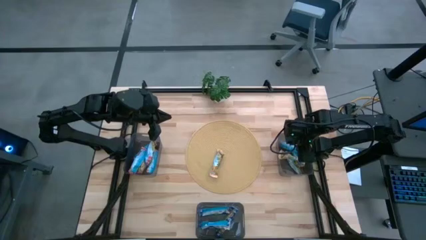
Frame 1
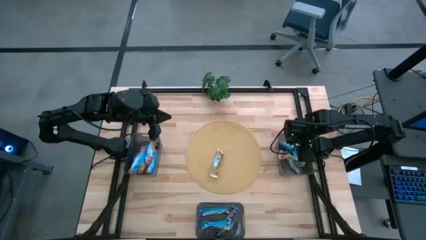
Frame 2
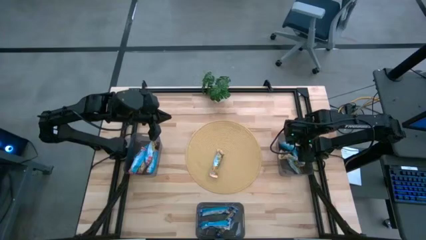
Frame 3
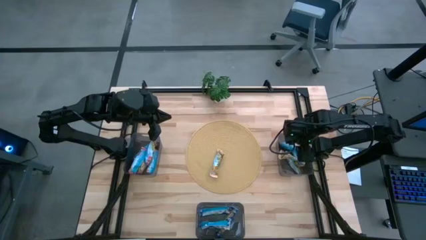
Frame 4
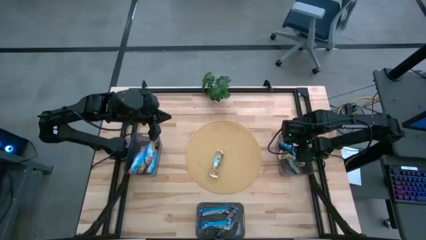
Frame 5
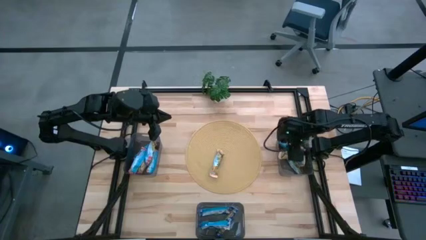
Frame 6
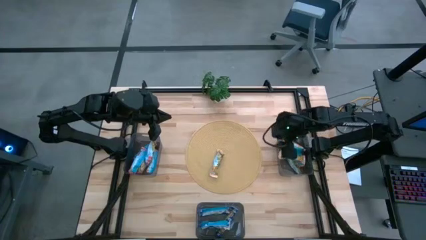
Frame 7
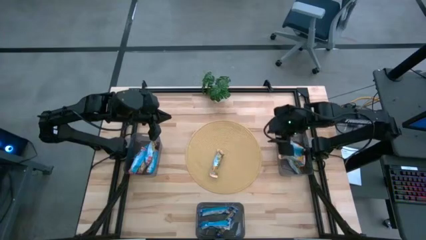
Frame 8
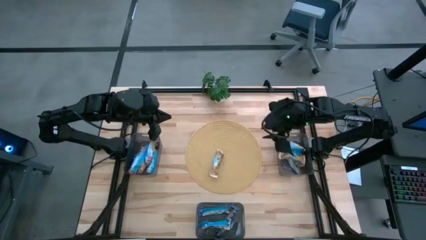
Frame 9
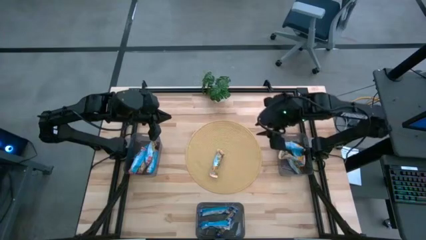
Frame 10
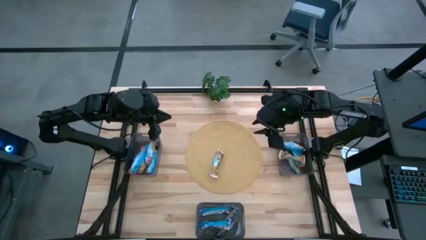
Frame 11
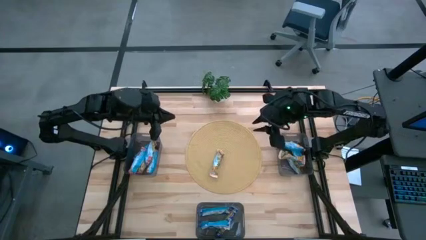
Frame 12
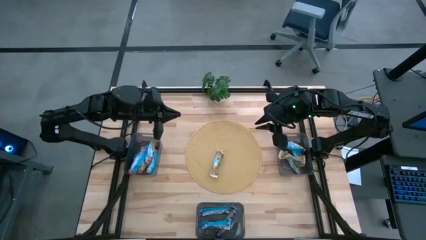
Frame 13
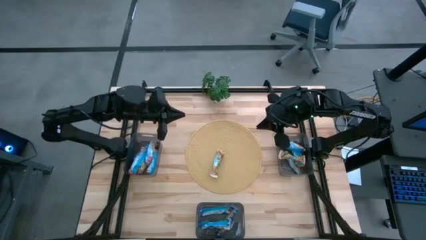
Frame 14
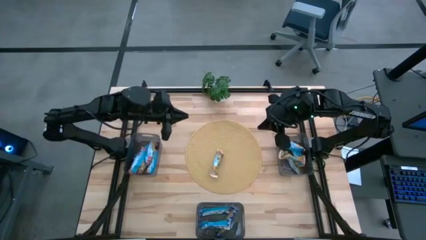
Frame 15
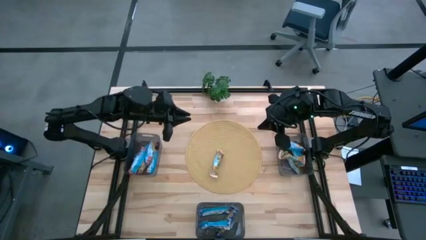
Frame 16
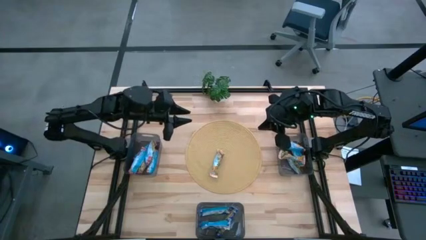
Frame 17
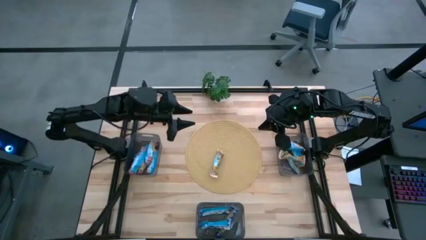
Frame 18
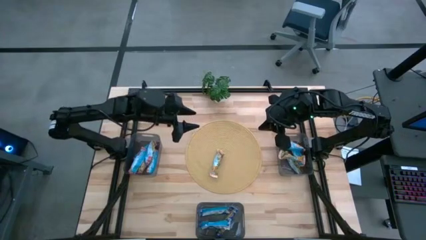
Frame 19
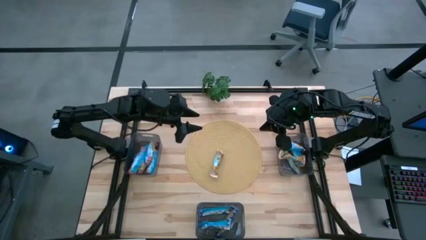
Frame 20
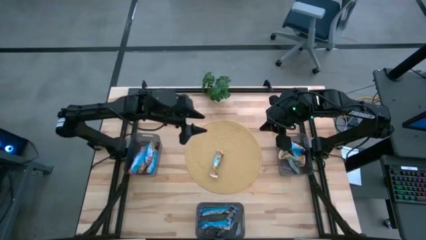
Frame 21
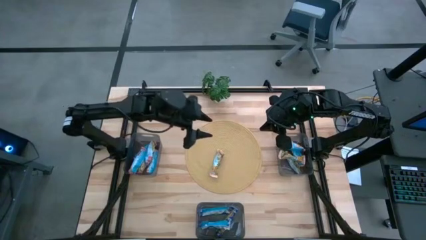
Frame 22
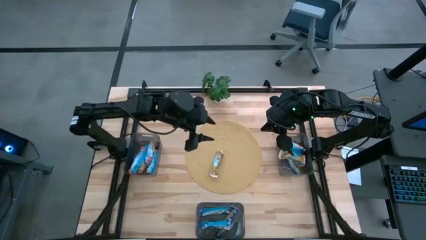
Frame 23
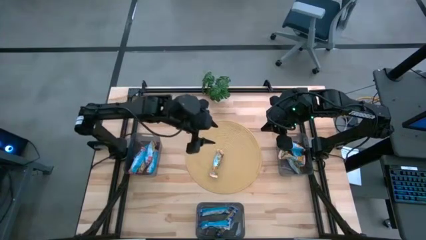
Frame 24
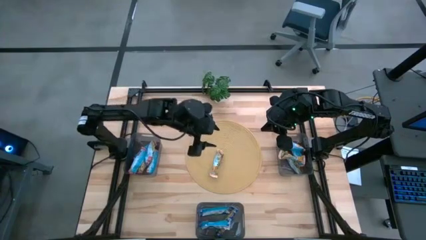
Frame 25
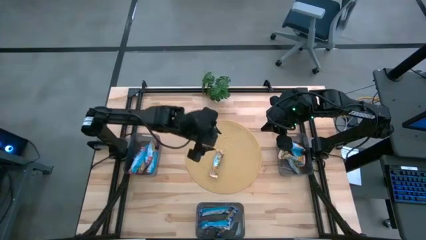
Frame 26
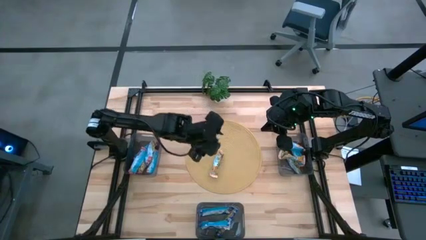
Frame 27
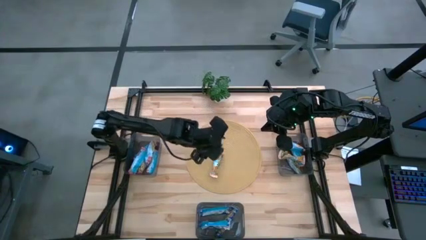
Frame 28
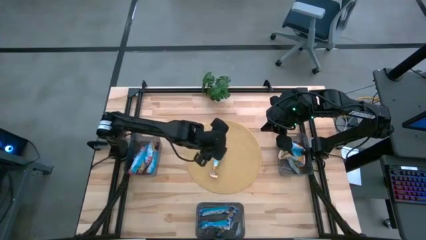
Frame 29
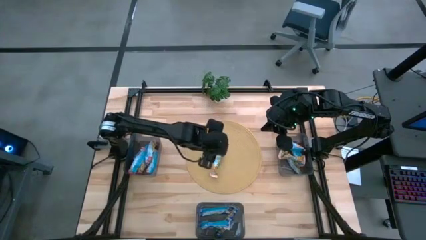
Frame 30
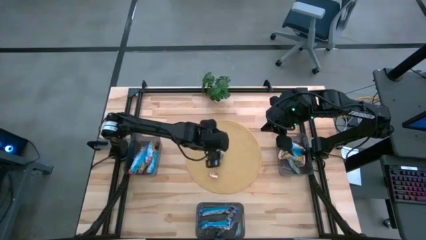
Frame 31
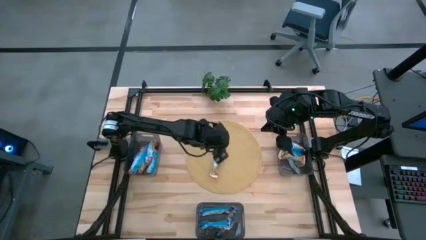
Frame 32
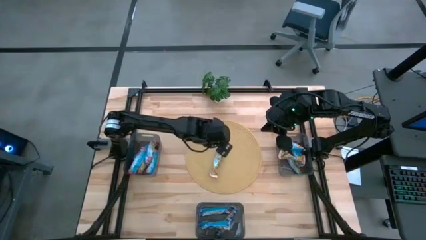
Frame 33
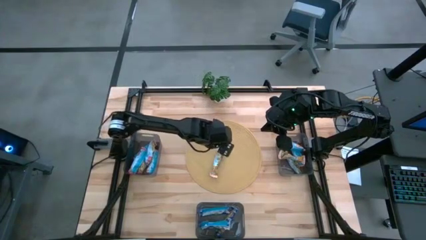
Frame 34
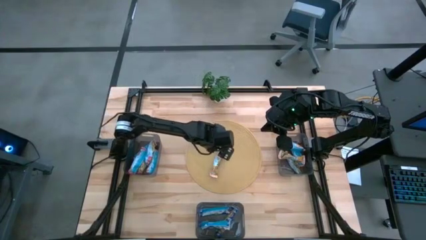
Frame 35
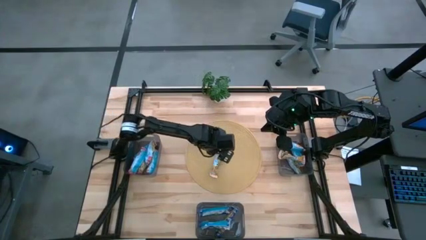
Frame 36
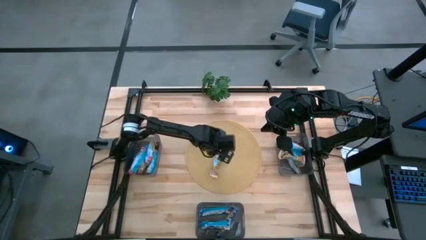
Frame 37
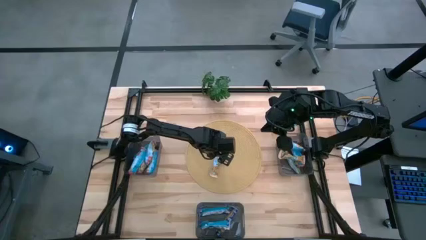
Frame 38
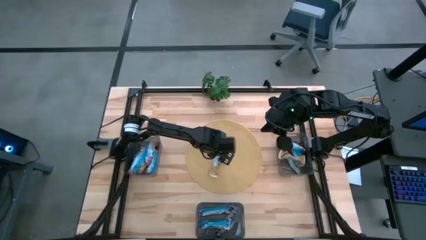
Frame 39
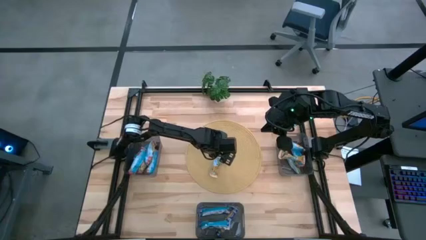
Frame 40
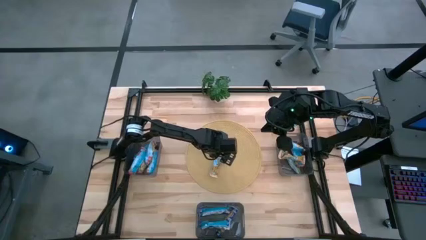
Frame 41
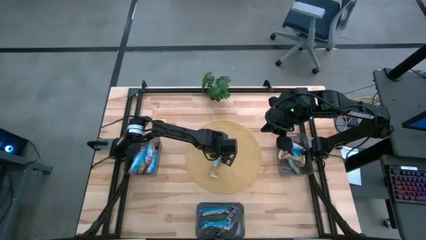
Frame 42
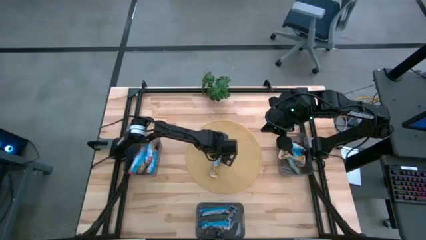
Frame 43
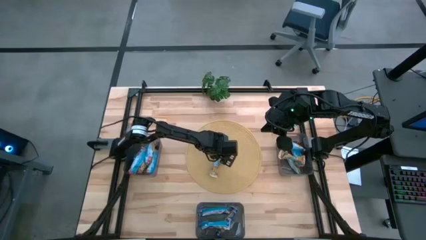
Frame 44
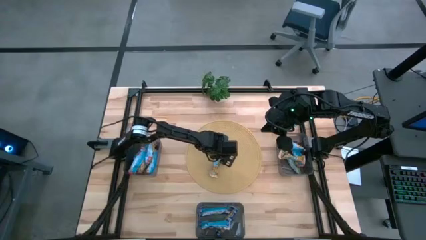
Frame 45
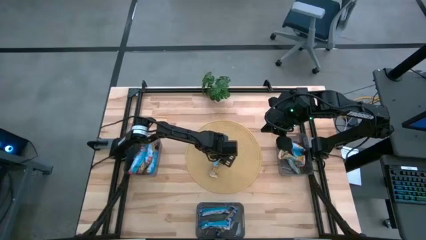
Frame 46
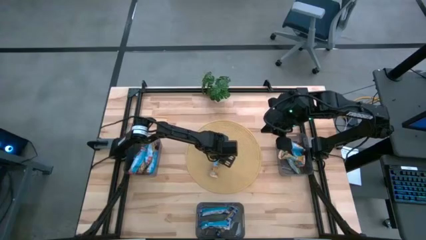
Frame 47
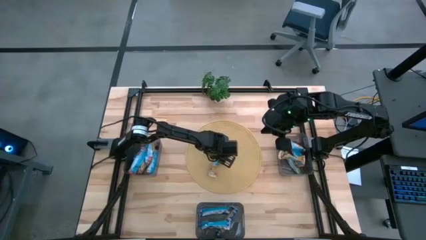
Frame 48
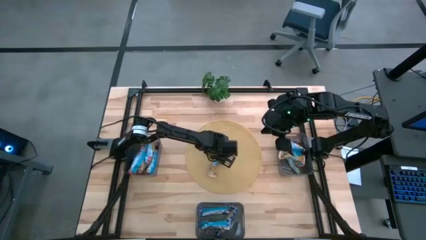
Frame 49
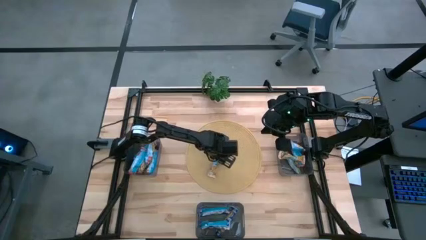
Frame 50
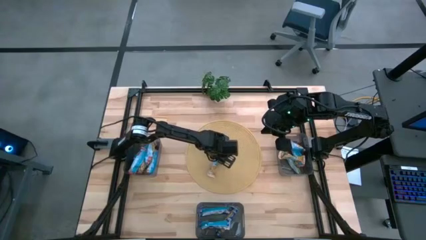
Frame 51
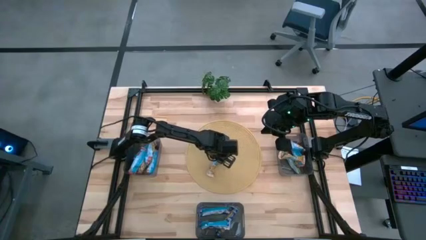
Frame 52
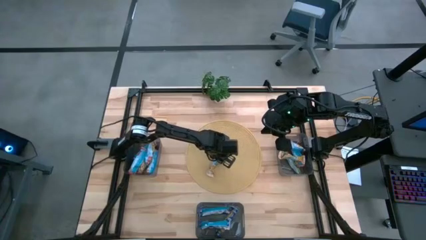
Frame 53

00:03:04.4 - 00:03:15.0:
Task: Pick and place Granola Bars by type
Put the yellow granola bar into the top right bin
